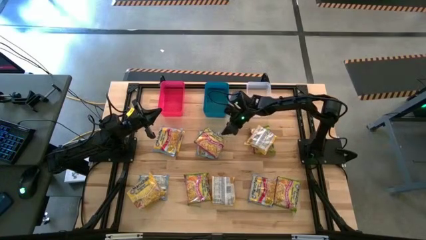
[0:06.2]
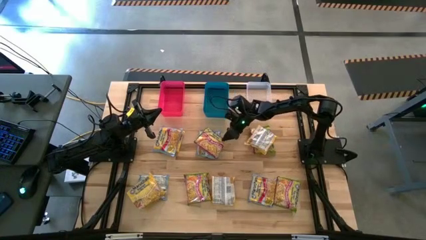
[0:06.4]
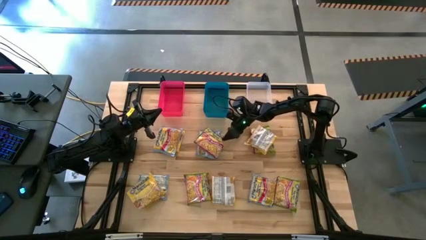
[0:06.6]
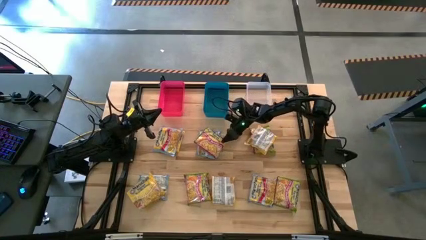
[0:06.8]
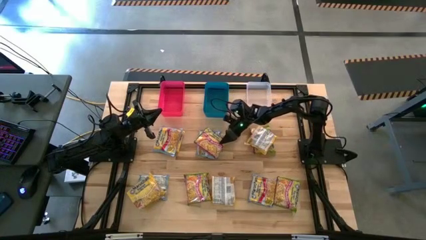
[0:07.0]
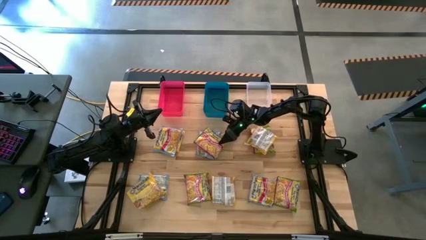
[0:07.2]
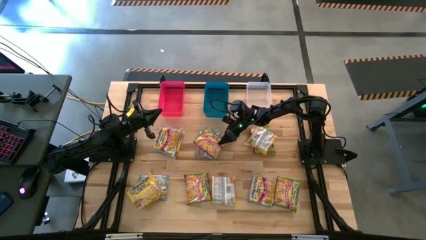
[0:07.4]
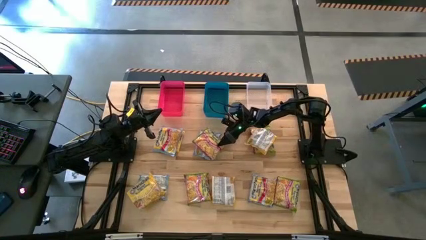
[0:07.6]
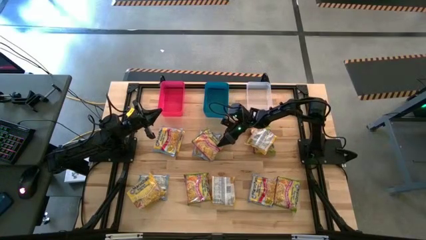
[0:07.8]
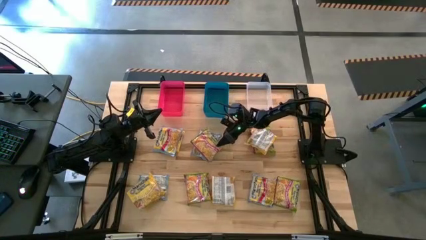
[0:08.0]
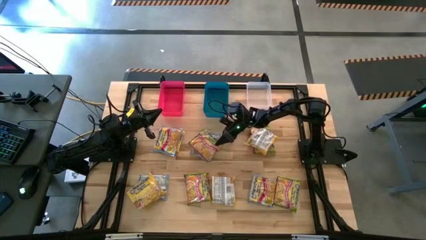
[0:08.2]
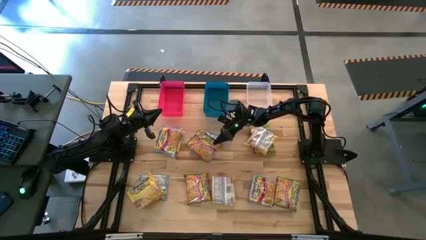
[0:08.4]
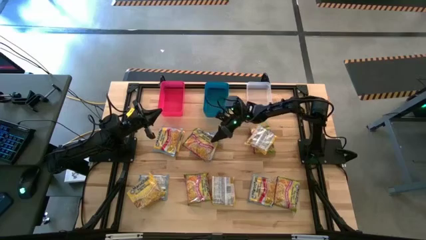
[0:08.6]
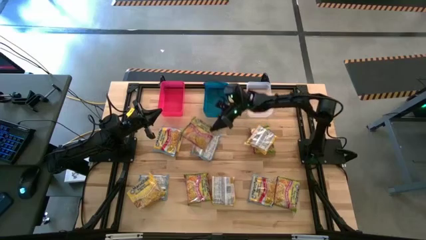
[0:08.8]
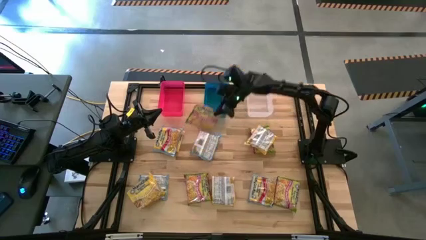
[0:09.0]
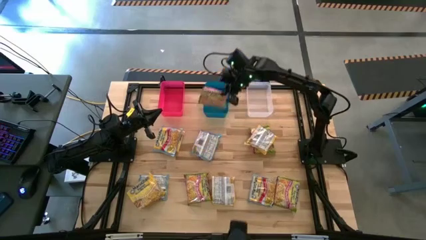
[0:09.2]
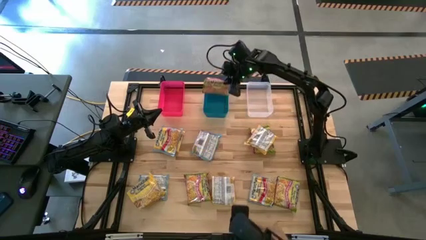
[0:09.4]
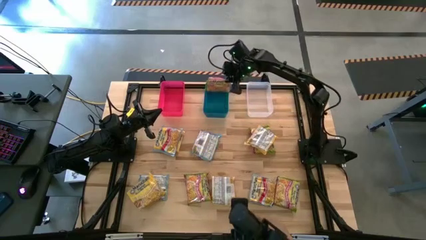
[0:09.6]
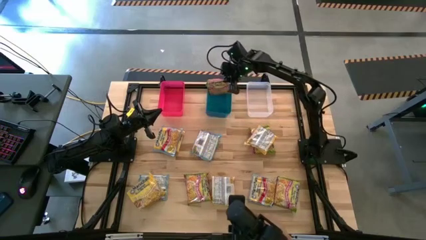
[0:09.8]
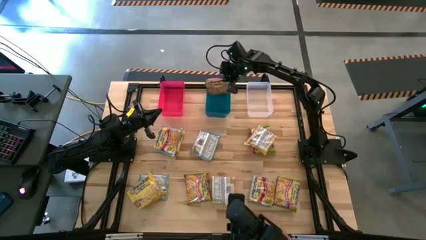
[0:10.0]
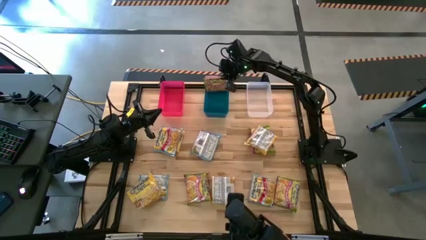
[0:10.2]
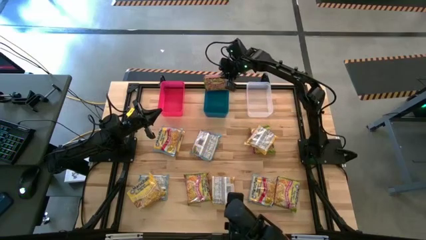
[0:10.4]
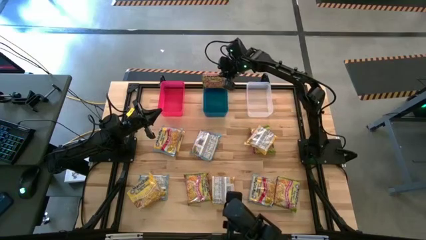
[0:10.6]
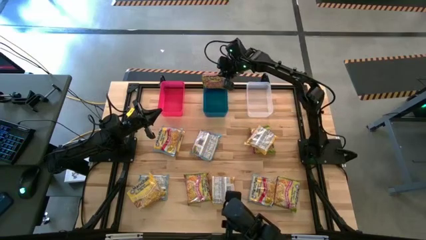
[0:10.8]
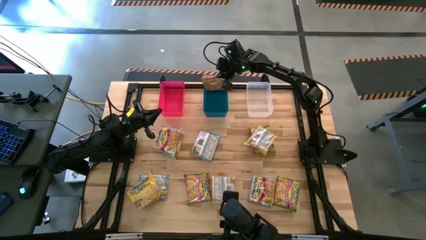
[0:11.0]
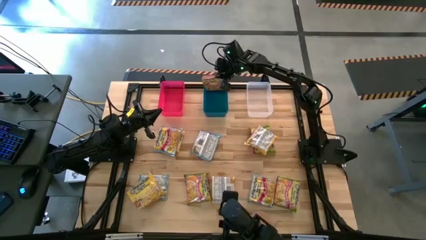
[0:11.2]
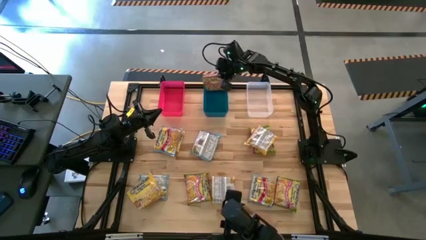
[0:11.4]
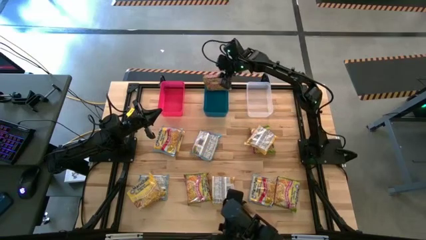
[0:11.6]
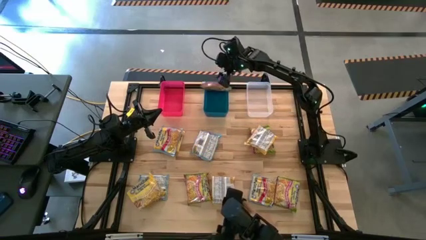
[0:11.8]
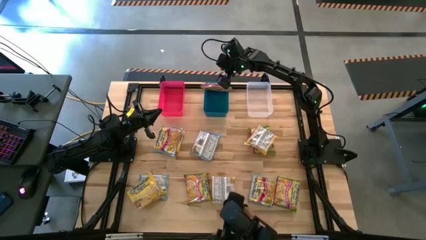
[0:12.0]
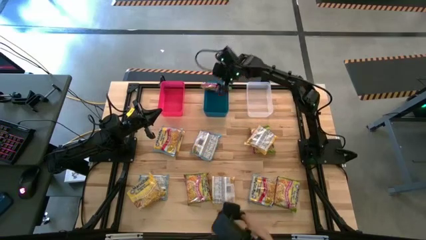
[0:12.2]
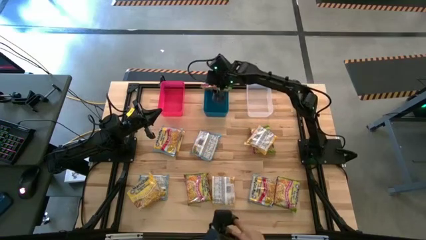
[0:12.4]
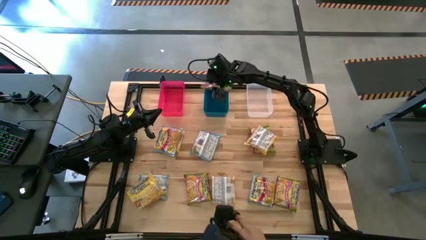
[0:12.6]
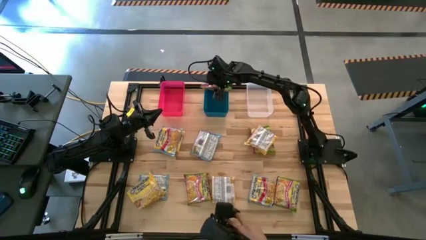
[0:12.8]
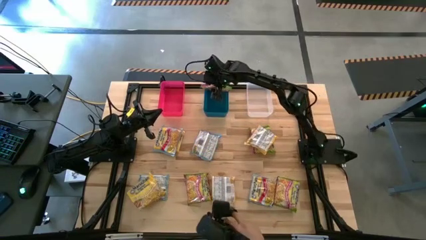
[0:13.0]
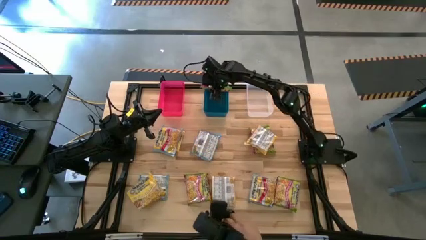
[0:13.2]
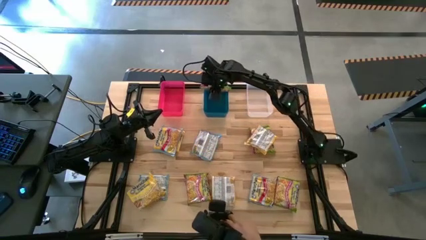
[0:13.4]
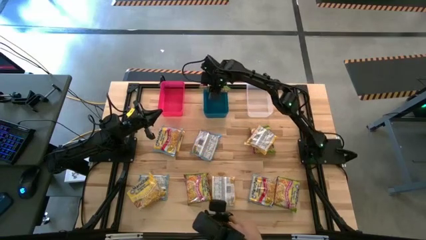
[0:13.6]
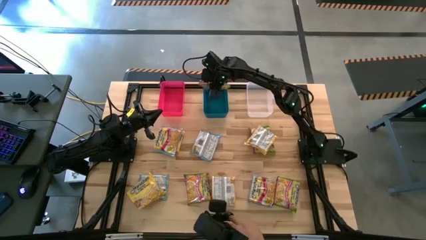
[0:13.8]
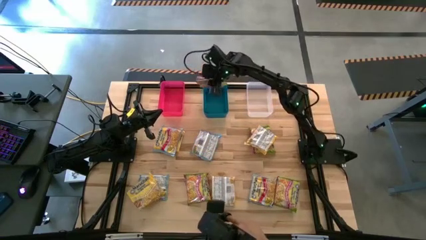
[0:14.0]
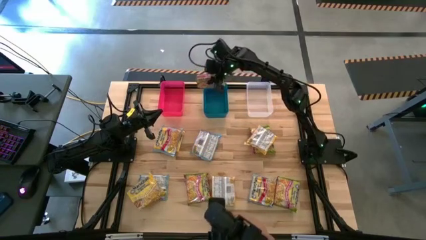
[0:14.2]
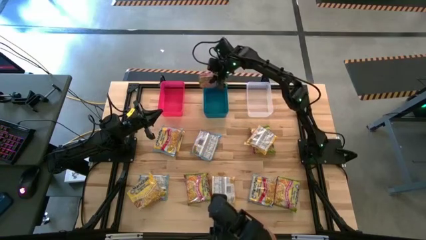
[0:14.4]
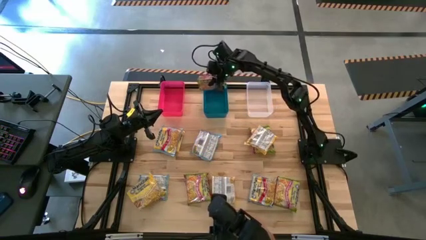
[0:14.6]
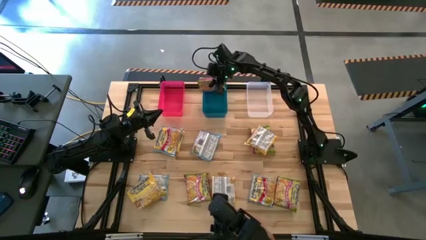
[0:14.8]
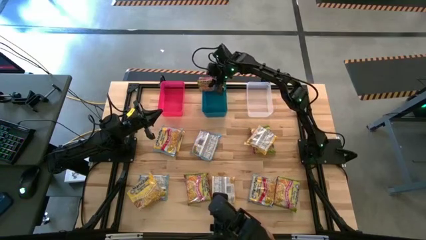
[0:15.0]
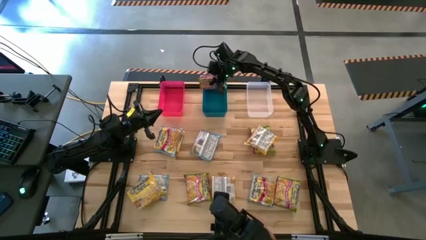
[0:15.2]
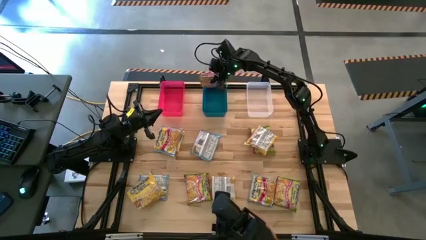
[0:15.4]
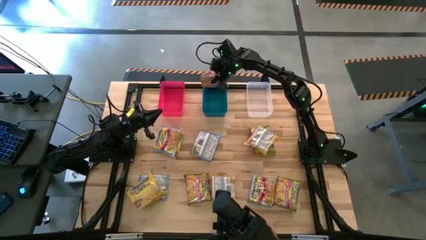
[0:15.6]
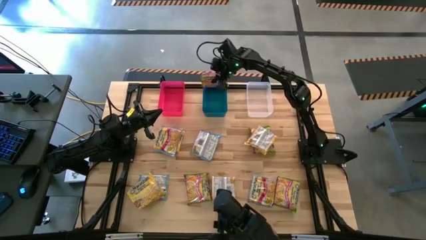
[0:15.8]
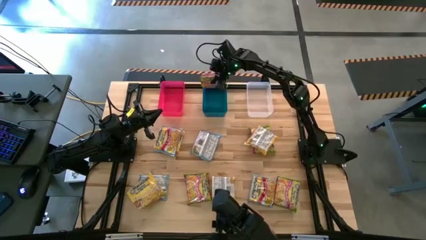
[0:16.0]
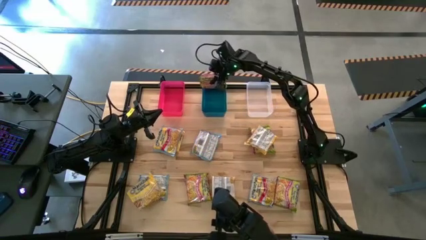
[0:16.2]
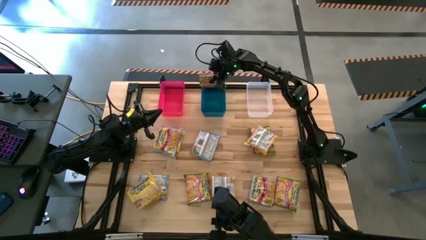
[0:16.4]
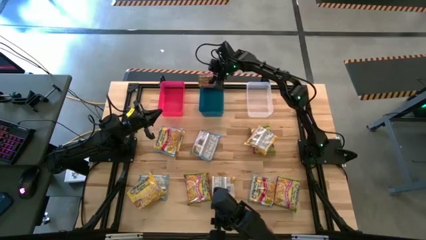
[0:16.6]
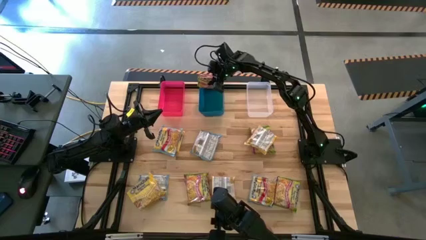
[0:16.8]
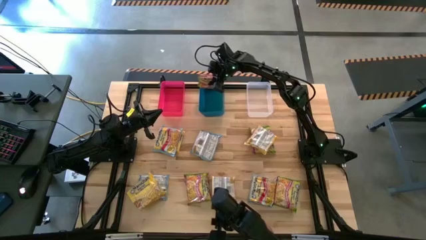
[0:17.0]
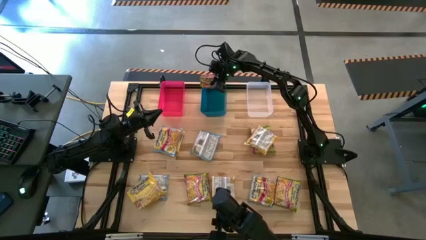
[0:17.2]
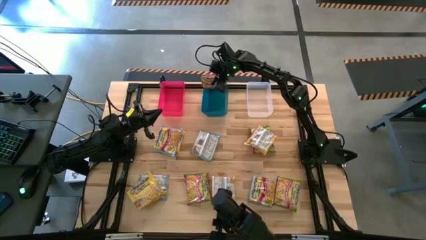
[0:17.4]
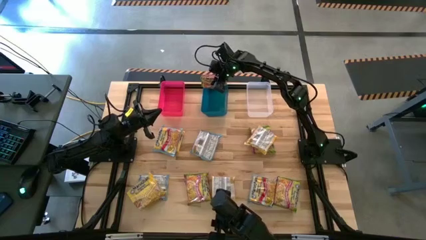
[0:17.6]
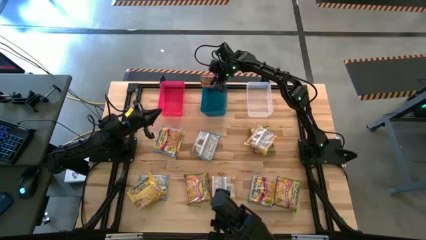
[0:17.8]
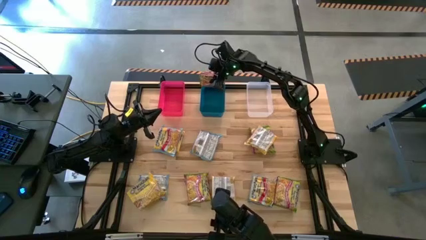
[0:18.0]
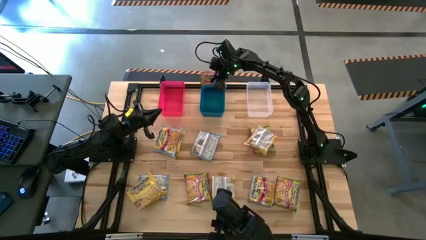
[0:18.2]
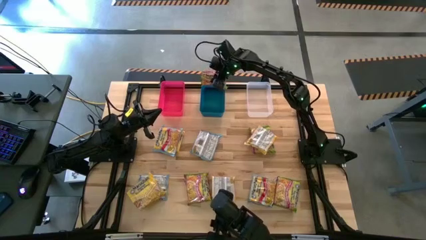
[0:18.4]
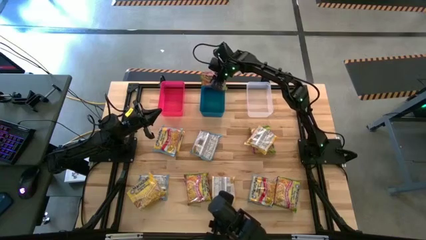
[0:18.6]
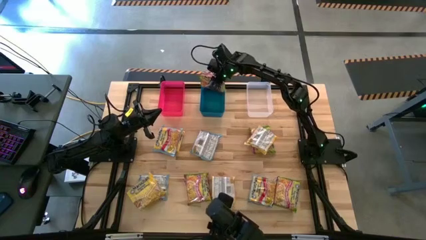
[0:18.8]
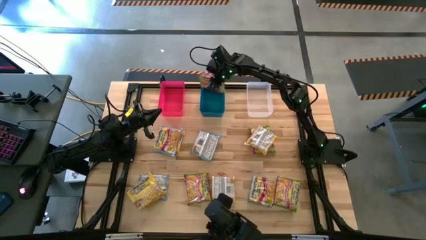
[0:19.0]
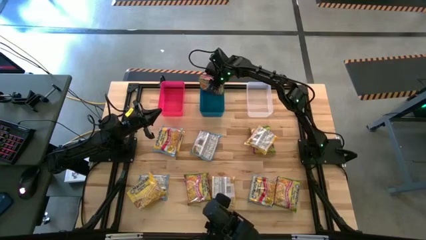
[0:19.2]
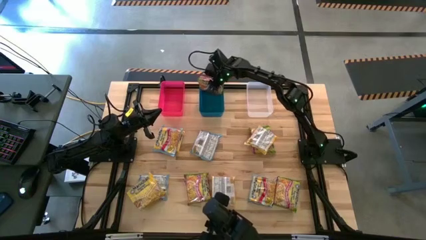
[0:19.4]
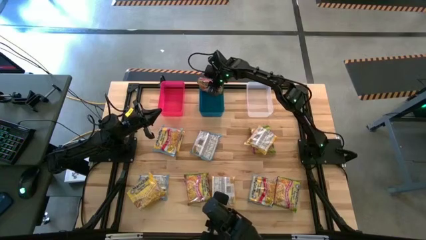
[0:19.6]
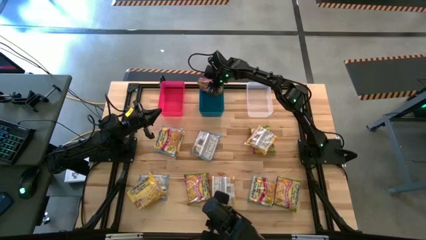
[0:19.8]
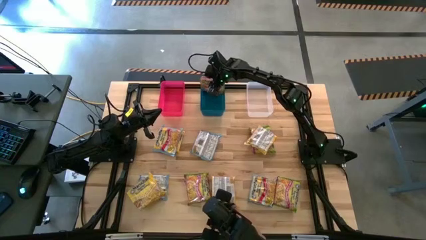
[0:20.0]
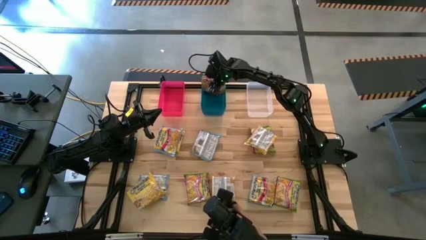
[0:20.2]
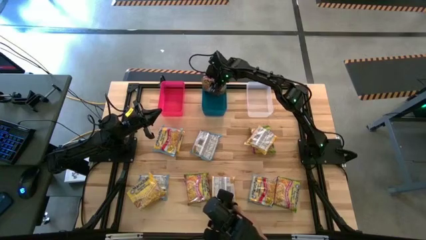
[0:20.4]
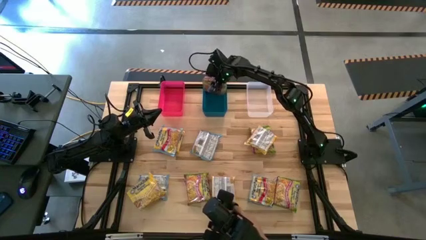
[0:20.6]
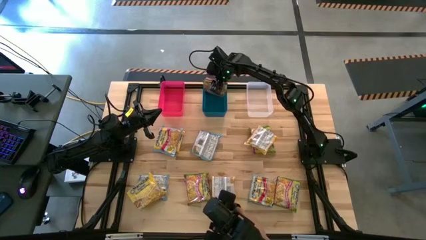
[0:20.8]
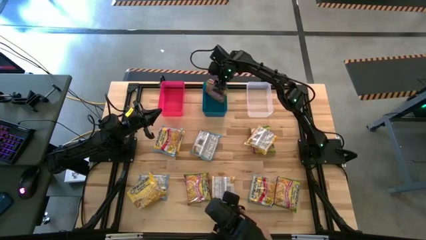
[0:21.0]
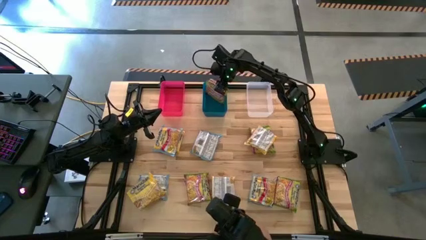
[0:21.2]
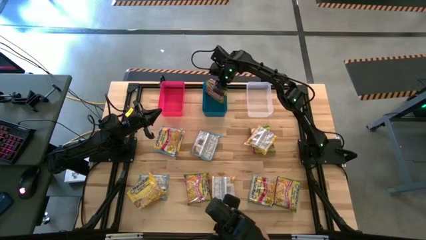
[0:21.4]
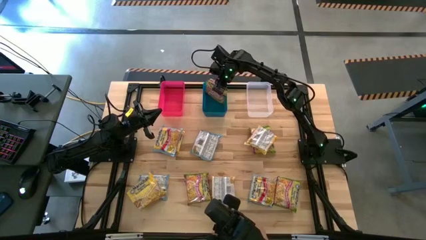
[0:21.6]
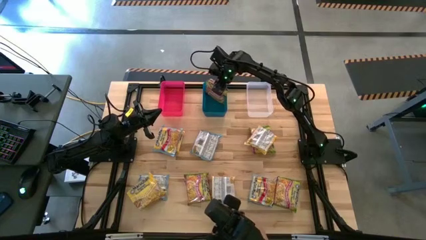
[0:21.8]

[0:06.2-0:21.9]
Task: Sort Maruchan noodles
Put the top left green noodle pack into the blue bin
